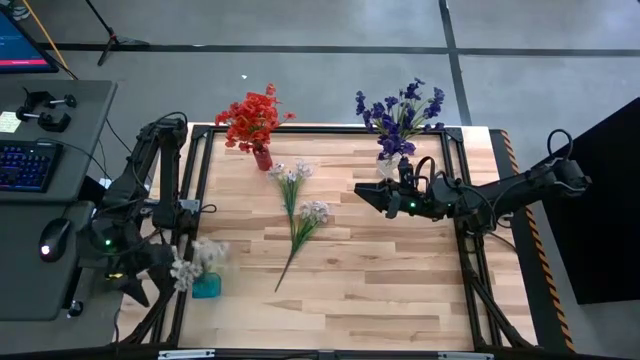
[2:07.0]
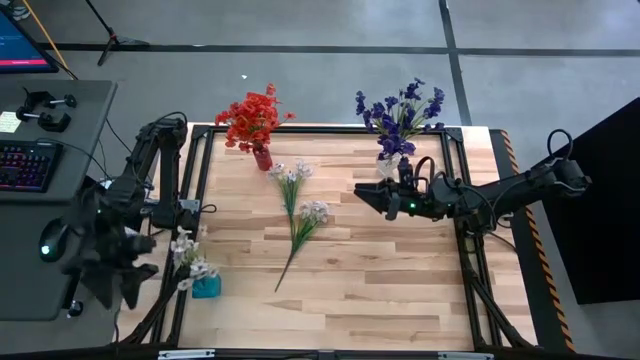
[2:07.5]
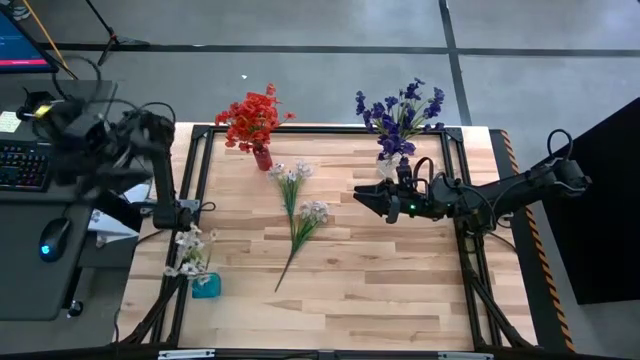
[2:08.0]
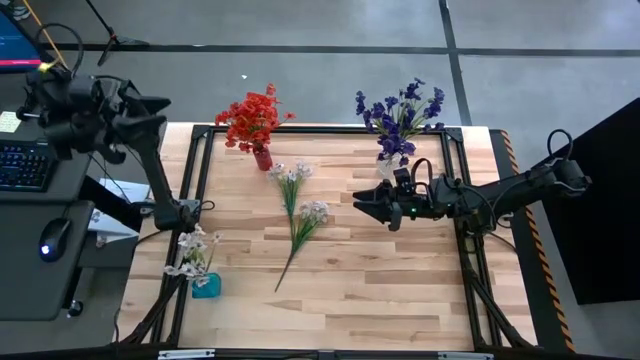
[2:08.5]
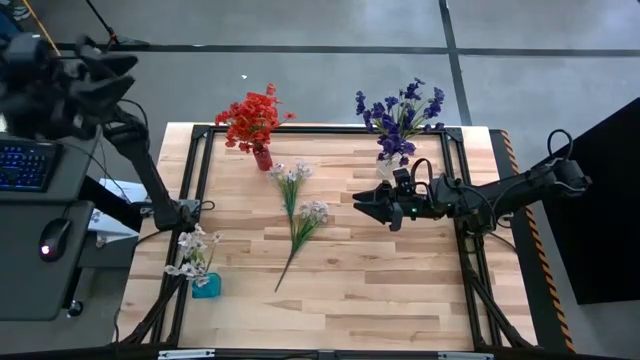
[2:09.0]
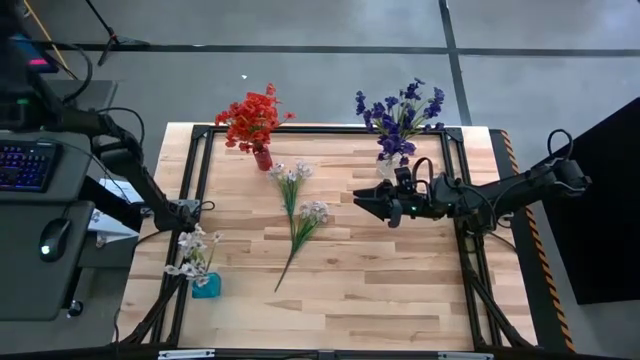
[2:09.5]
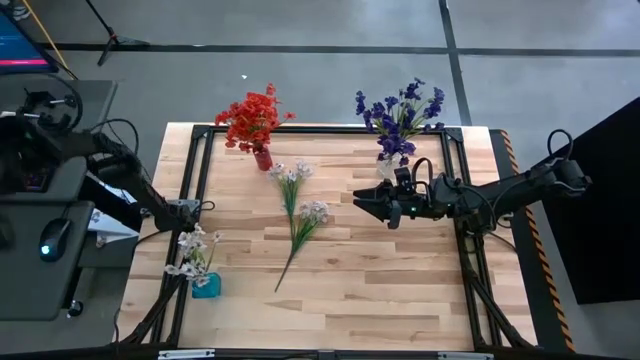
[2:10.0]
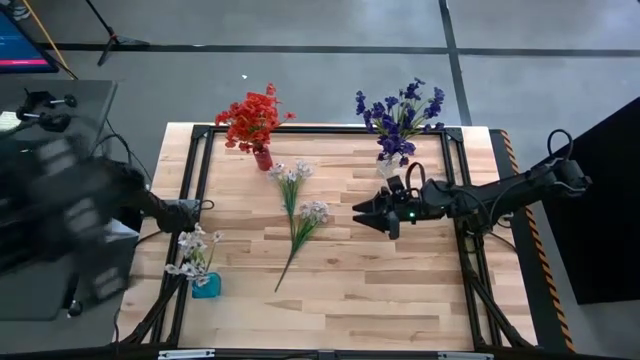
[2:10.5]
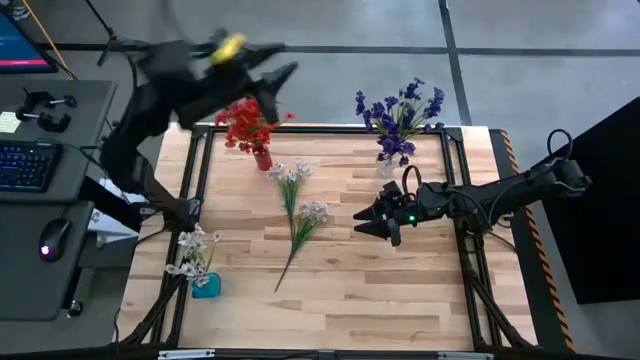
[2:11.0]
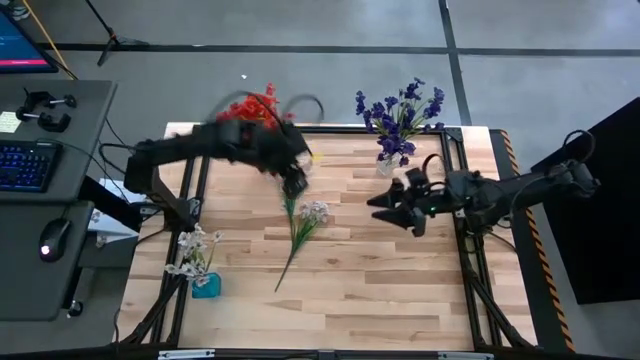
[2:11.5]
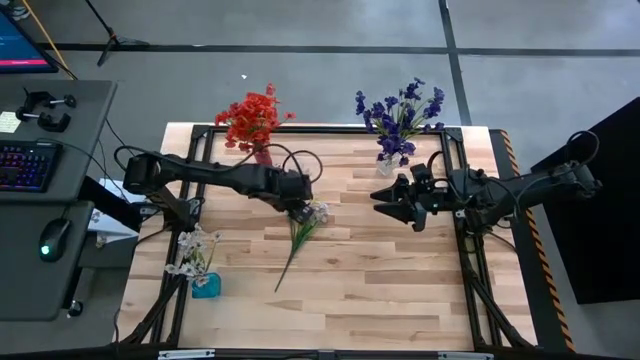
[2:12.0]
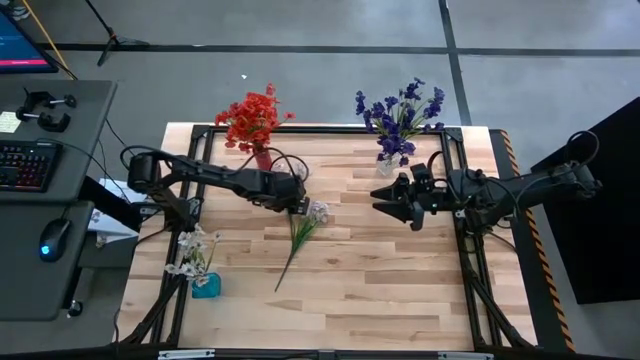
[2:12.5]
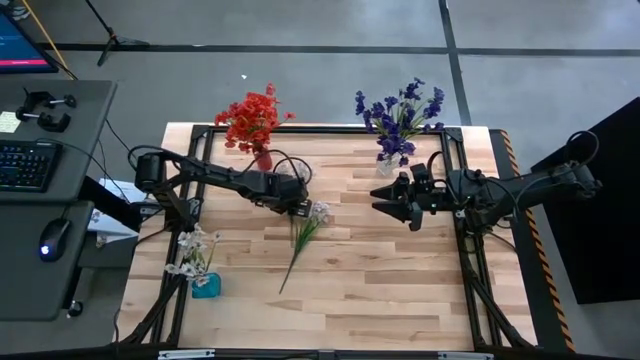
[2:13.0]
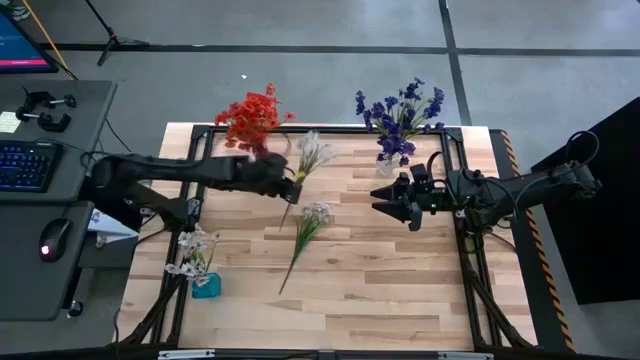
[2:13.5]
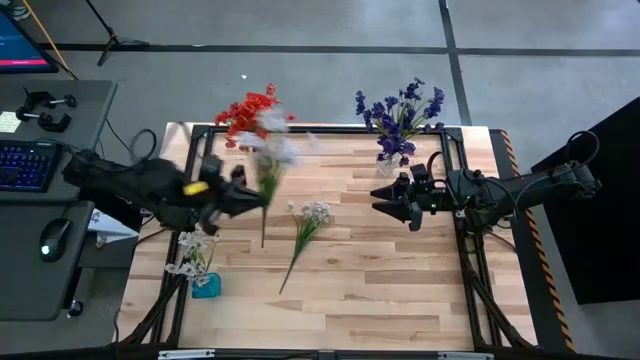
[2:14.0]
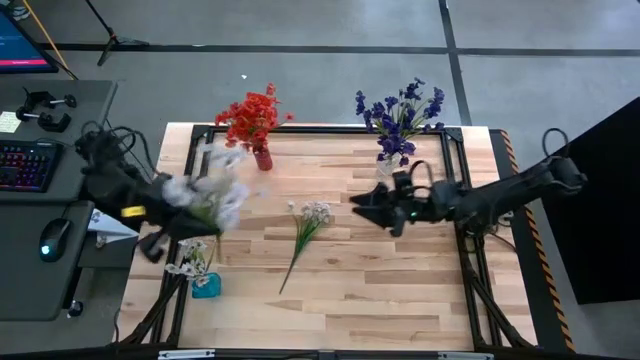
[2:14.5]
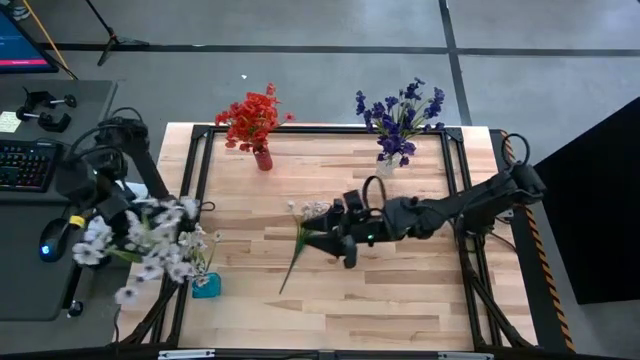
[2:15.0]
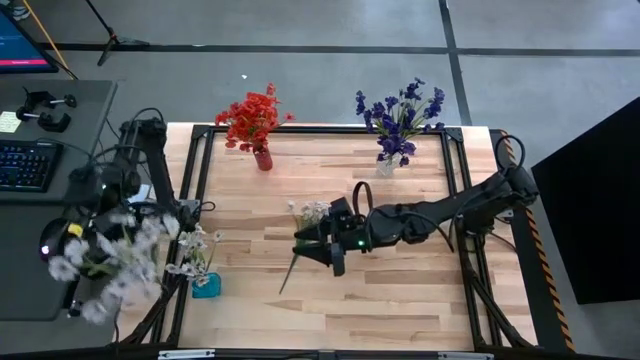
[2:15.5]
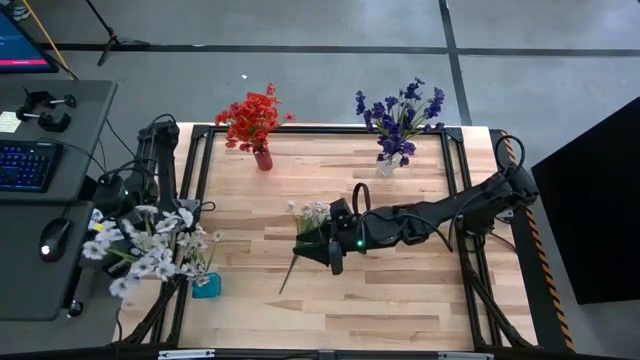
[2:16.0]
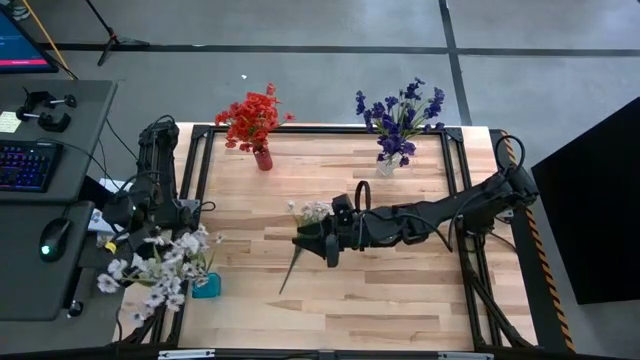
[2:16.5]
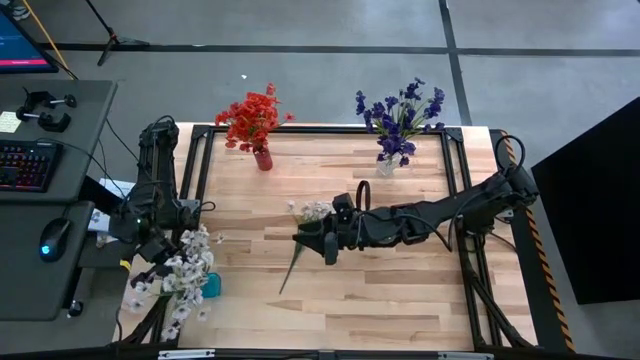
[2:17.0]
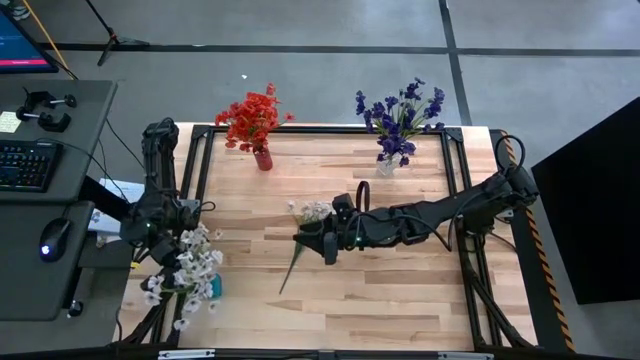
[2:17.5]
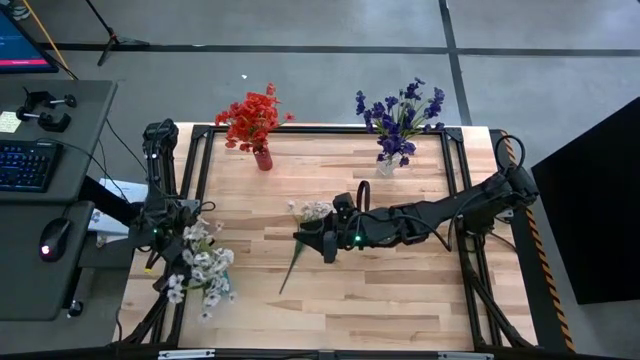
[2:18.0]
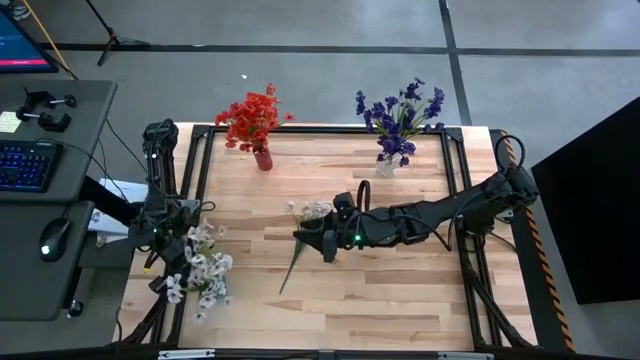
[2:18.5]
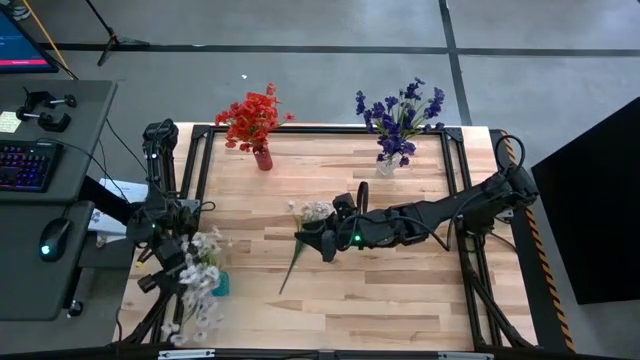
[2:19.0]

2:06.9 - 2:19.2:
Task: Sort flowers into vase by color
Put the left white flowers into the blue vase

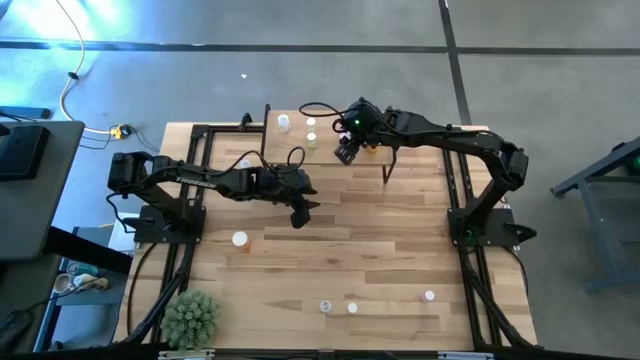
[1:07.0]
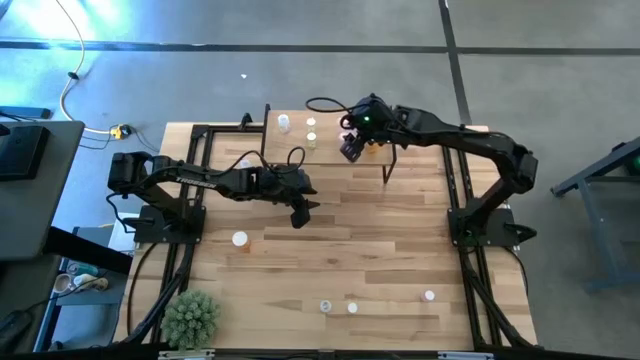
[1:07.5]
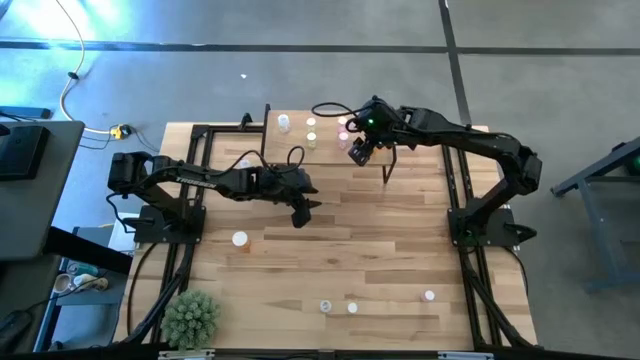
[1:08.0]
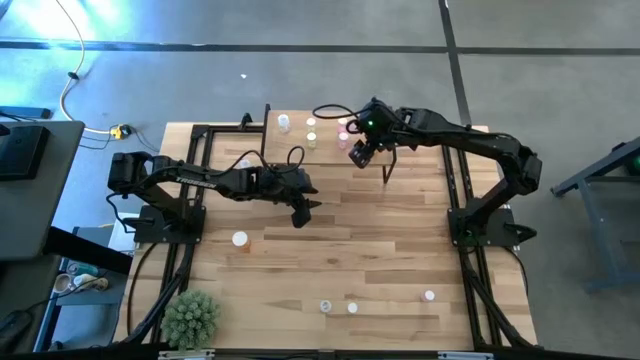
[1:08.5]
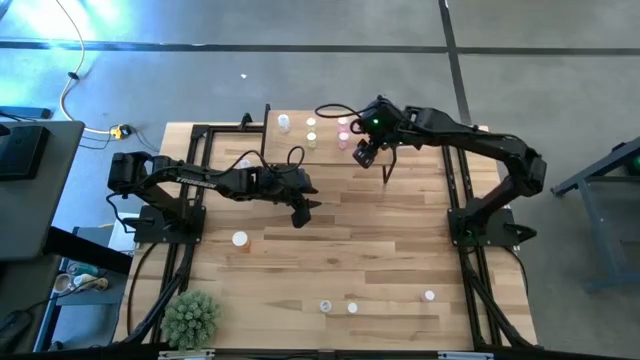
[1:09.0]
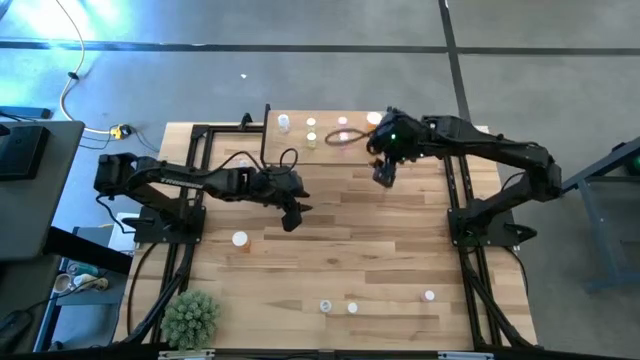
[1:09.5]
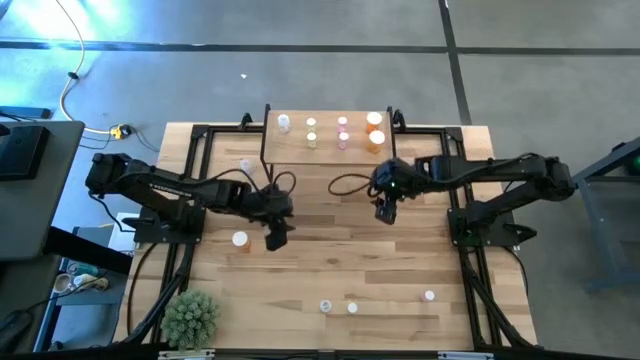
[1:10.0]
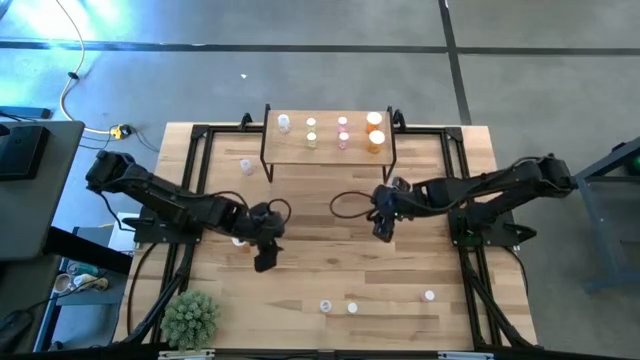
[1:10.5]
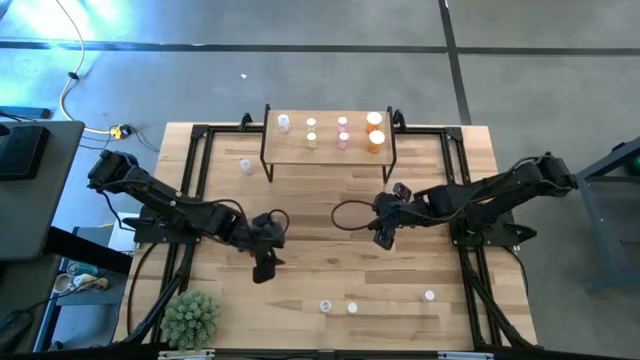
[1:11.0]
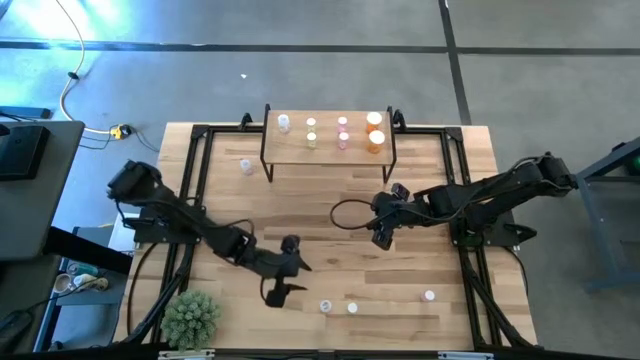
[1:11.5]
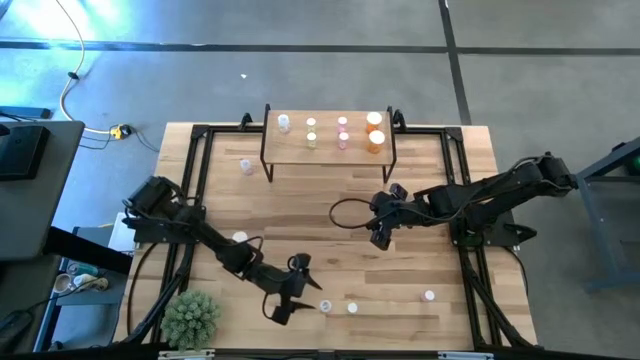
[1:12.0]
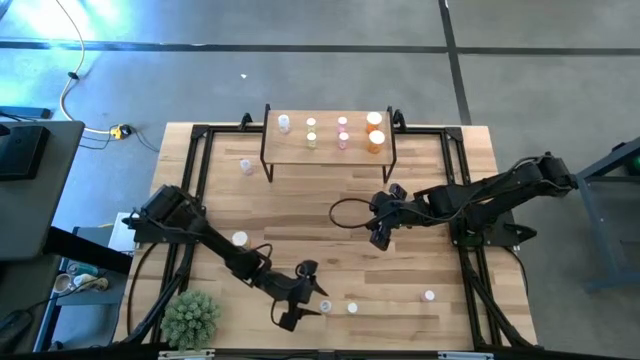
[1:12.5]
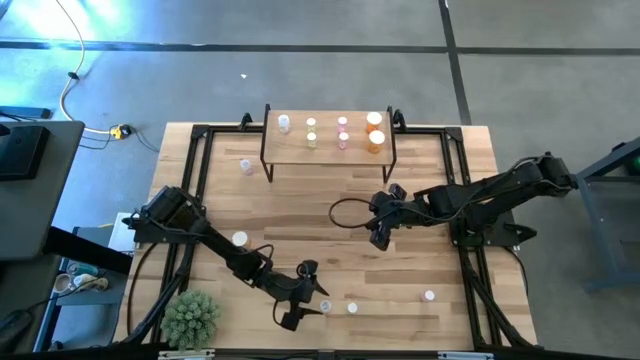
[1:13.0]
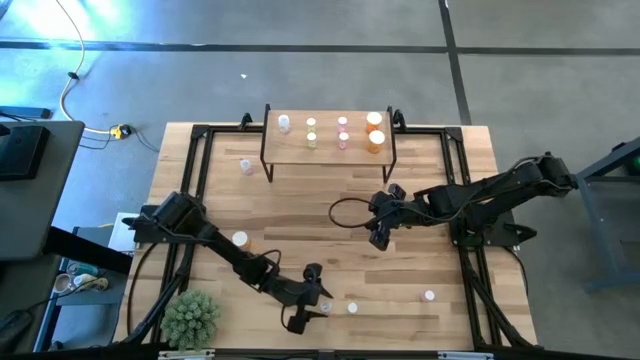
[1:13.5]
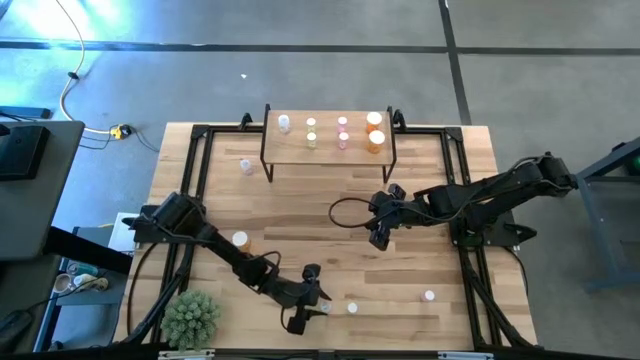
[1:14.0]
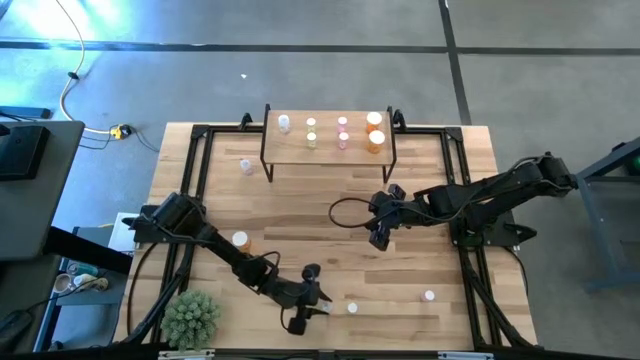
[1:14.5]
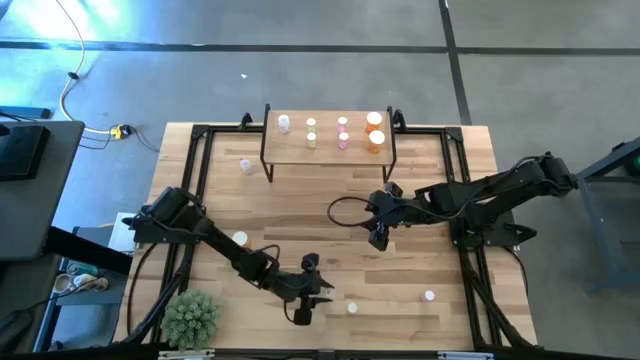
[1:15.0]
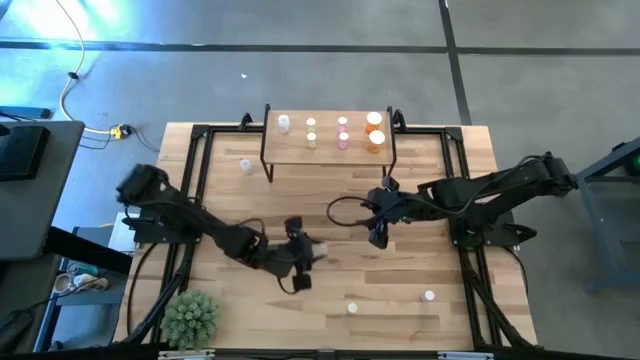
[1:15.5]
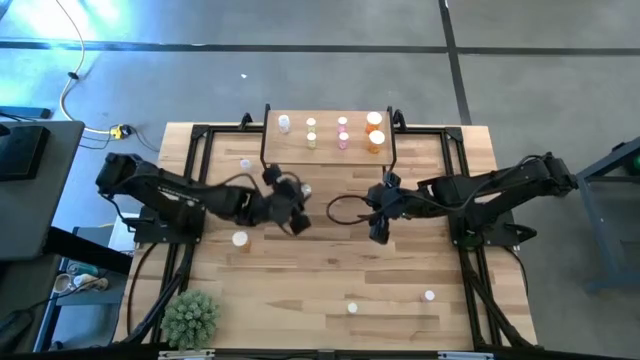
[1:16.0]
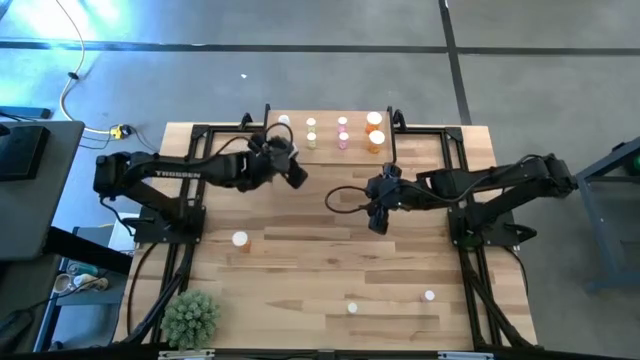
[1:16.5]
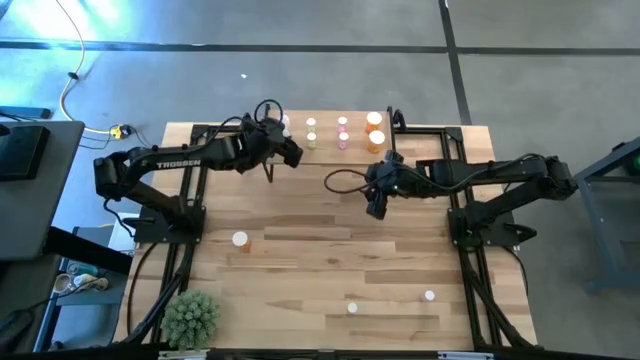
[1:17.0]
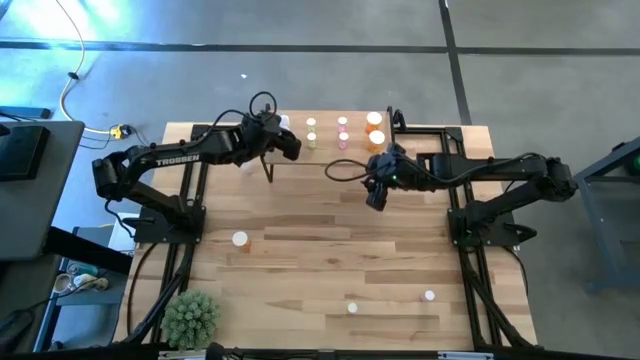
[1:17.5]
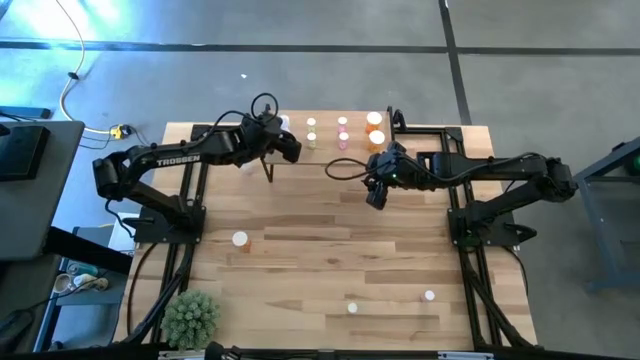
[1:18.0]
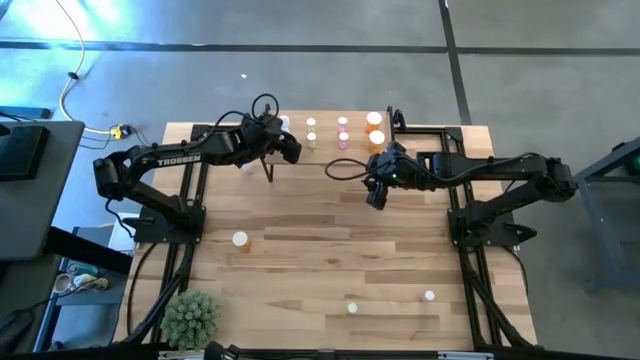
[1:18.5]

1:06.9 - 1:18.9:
Task: Pick and place medicine bottles onto shelf by color
Put the bottom transparent pill bottle on the shelf aligned with the transparent pill bottle
